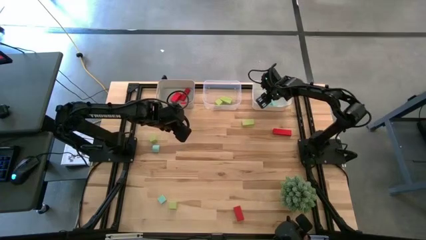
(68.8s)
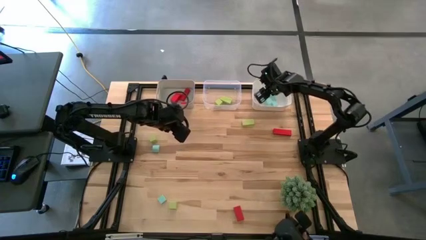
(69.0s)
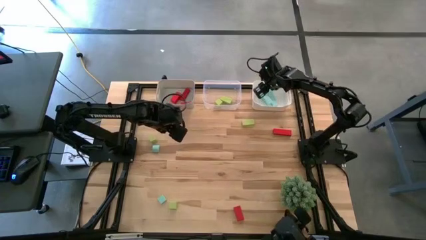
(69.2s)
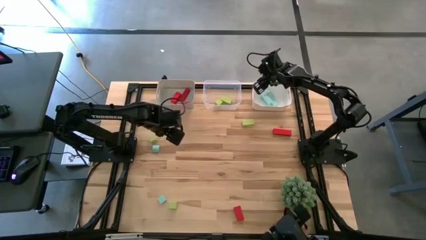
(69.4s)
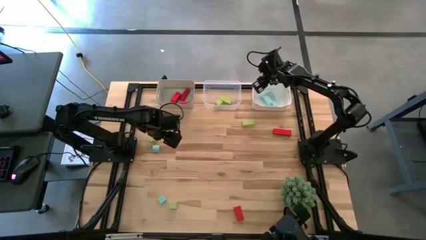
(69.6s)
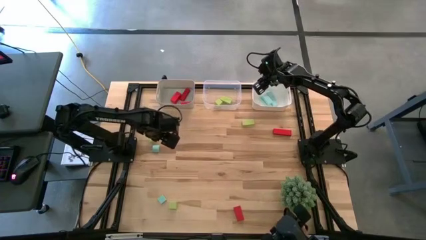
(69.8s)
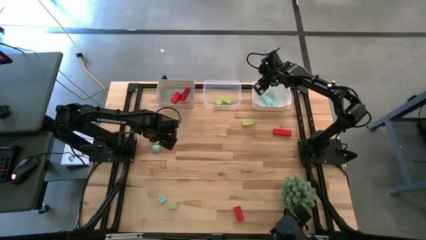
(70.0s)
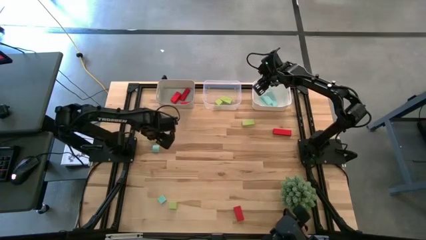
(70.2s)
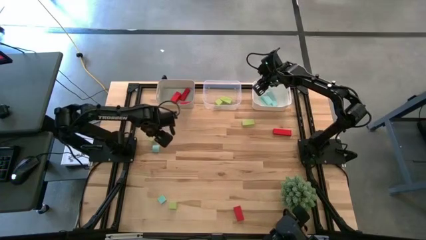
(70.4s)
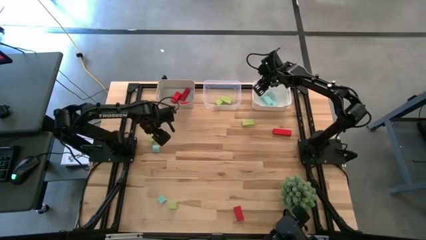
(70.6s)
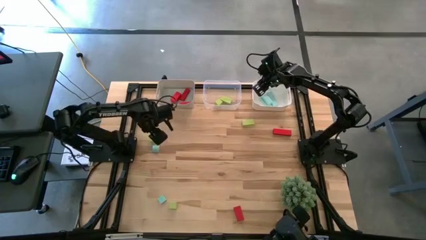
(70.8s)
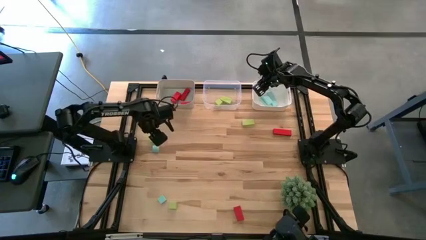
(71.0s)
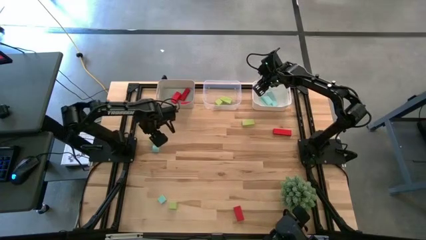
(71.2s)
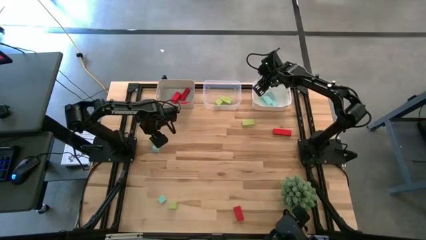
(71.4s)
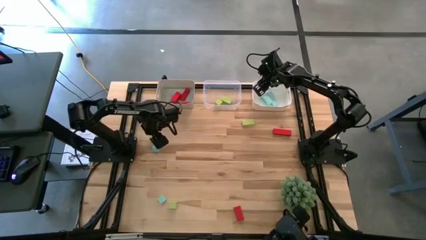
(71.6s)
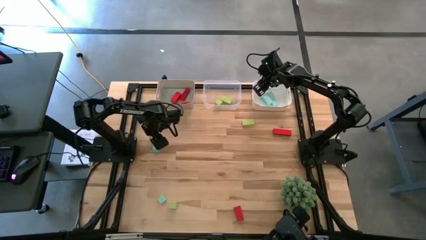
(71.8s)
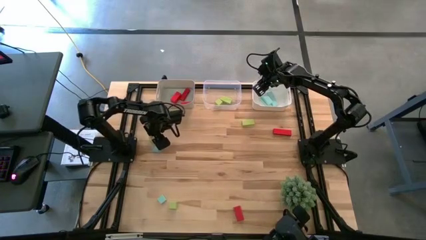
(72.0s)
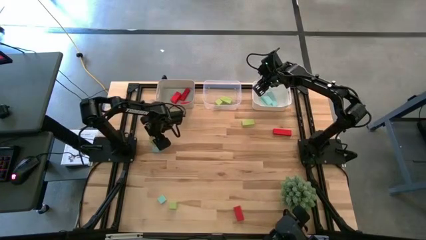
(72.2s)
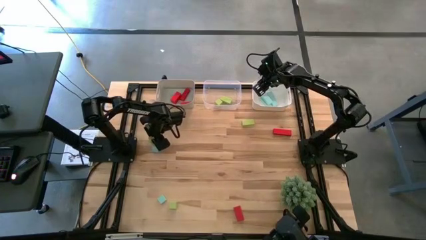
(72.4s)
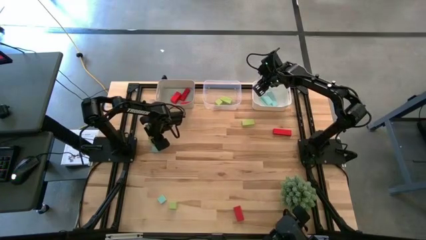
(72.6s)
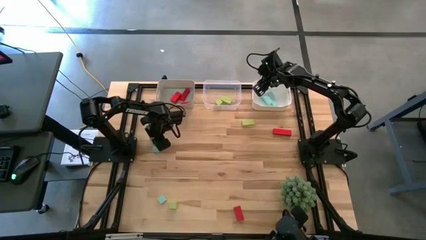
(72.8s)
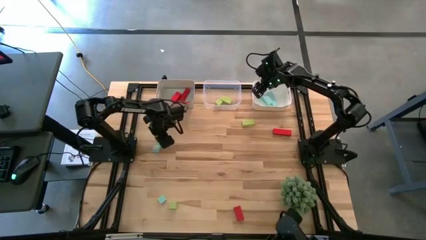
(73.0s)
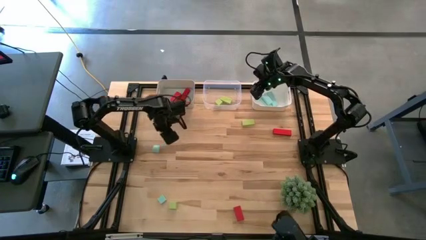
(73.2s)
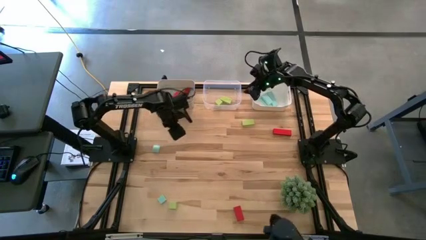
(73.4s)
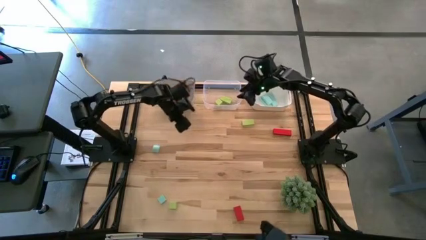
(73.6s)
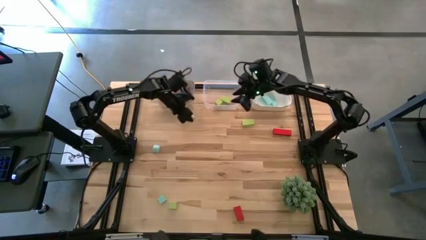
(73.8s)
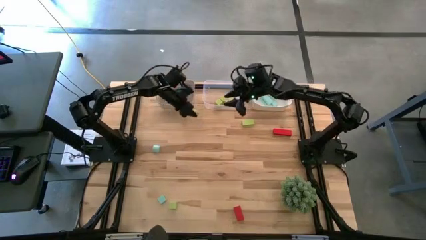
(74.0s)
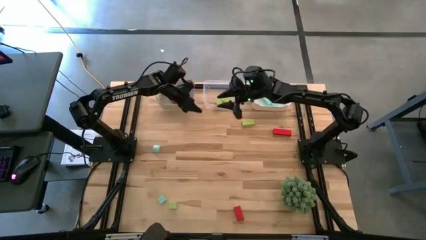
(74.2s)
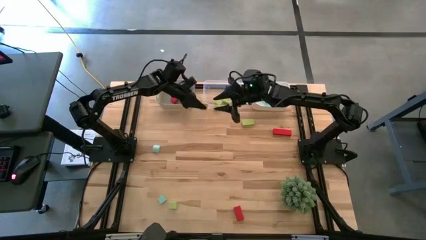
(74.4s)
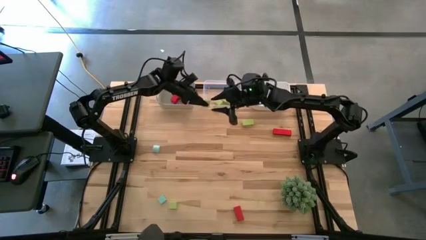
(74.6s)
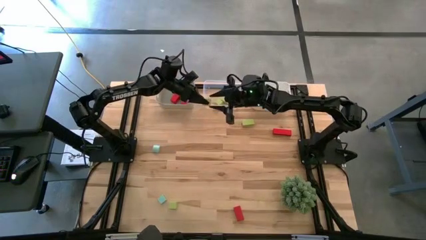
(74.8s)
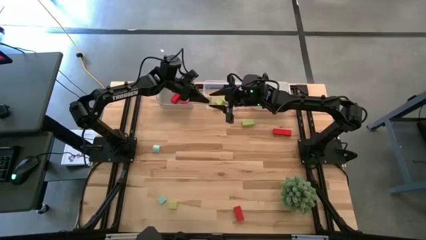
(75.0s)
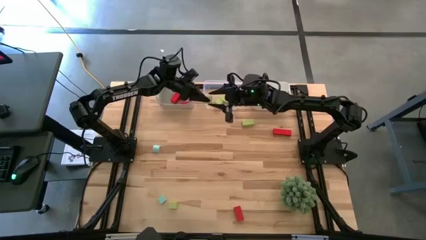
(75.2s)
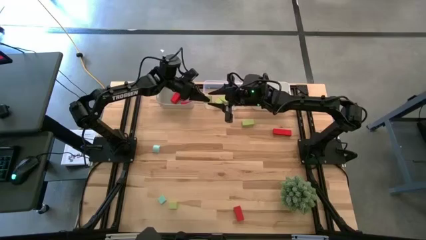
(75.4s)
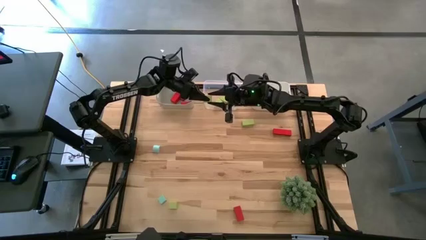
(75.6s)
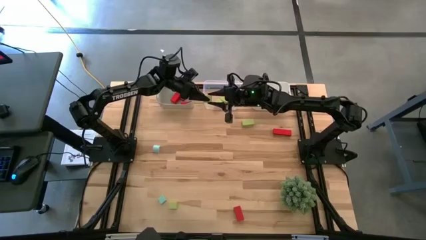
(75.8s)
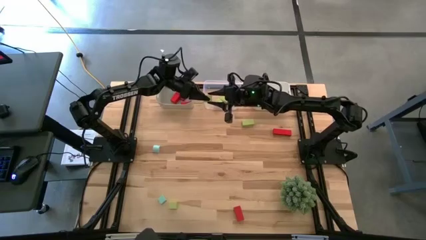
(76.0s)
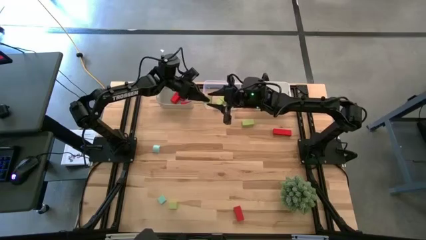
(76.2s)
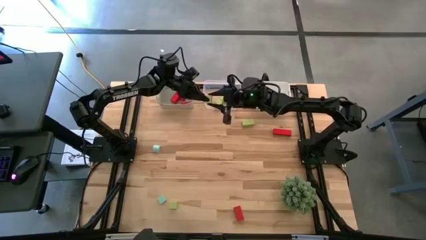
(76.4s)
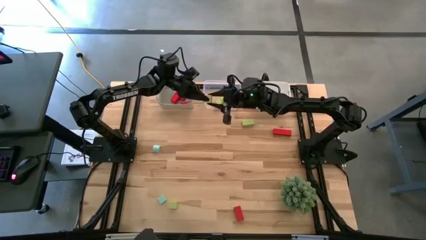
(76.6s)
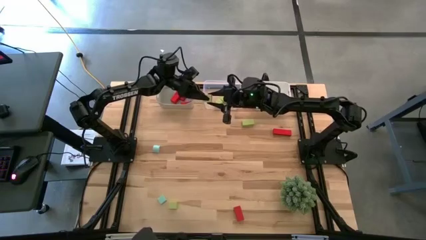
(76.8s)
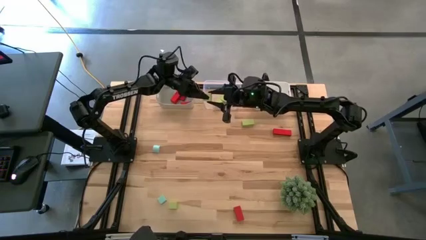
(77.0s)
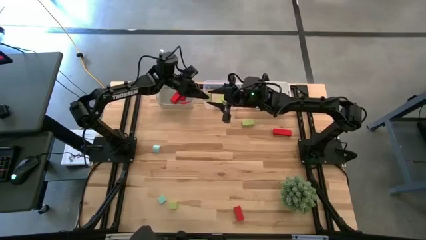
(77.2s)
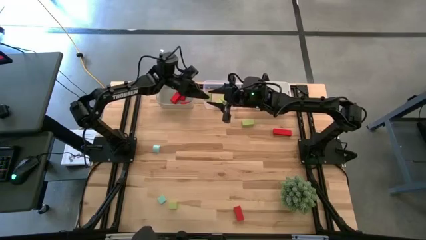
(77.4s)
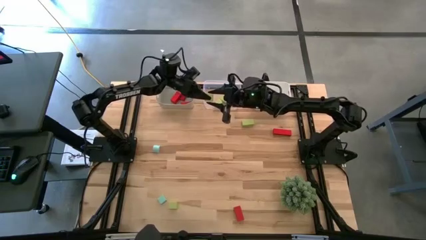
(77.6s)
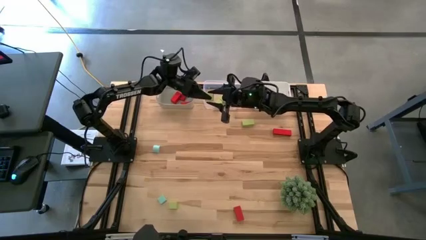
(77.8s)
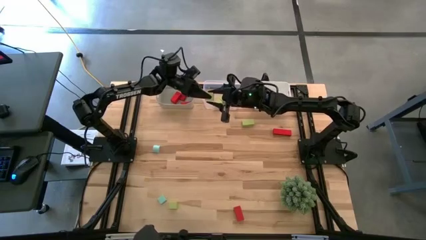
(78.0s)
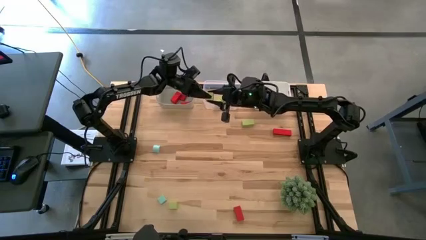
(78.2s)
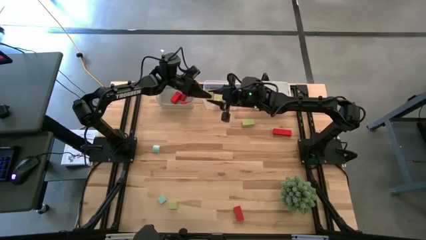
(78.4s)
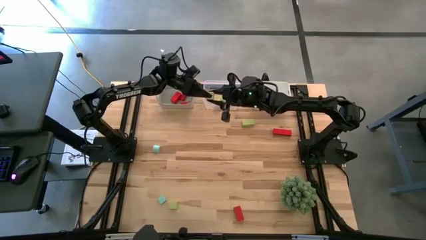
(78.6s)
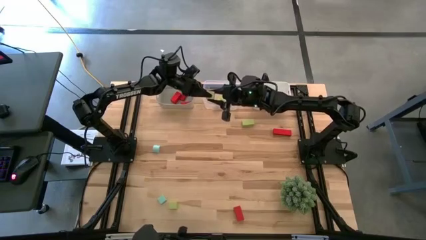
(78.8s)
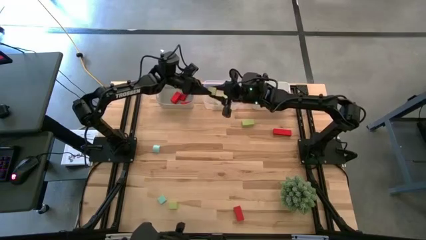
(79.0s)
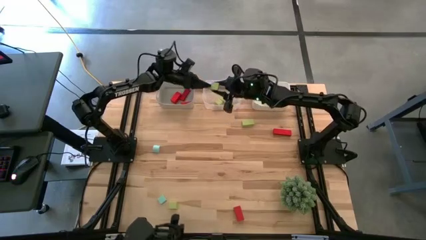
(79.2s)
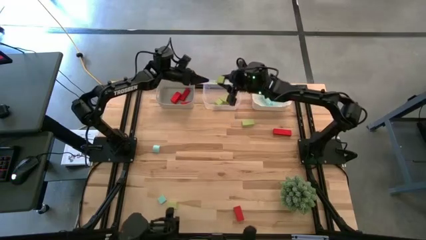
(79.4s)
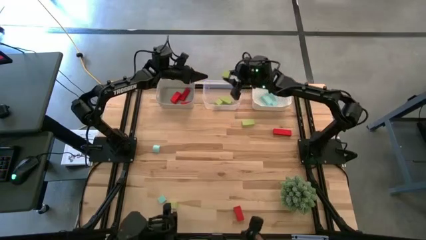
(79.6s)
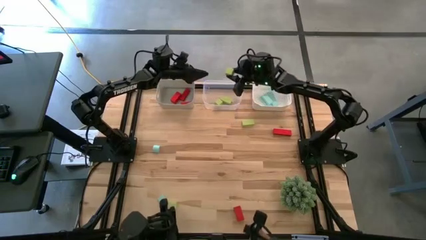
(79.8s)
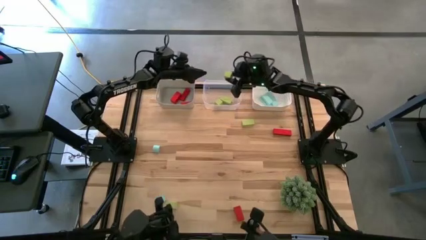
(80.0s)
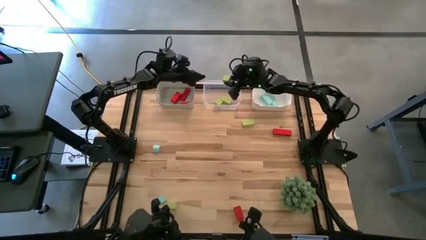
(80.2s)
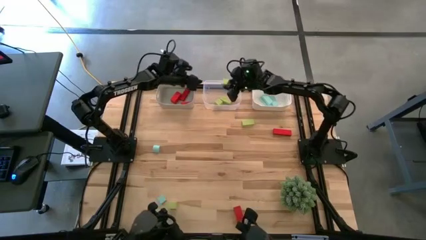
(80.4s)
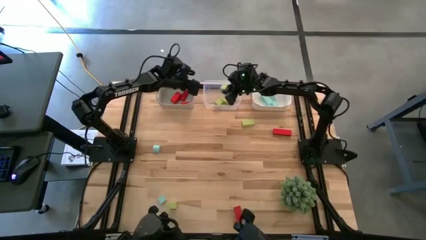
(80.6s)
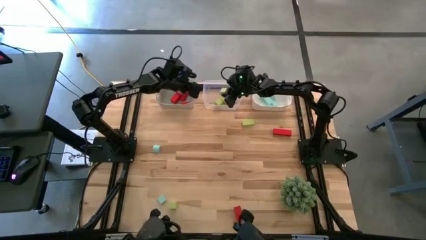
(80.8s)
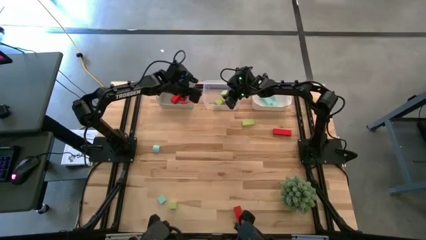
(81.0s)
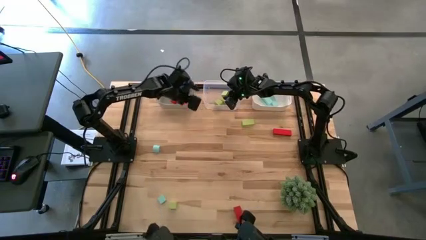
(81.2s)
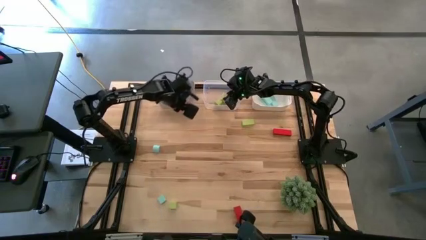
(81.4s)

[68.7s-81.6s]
Task: Sort & place blocks by color
Put the green block into the transparent bin

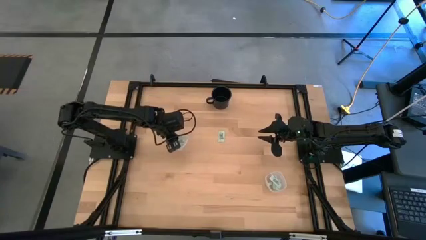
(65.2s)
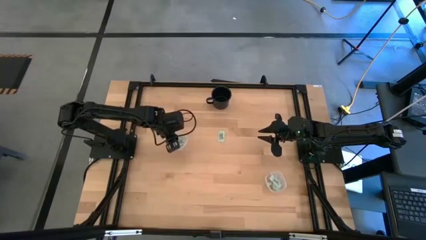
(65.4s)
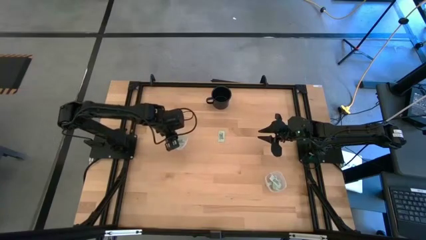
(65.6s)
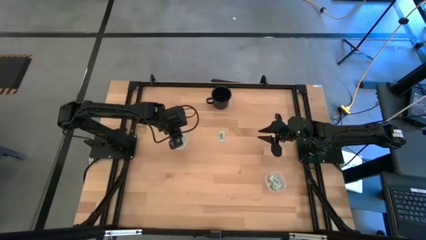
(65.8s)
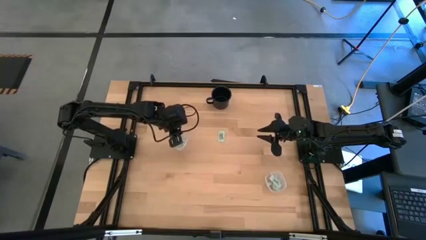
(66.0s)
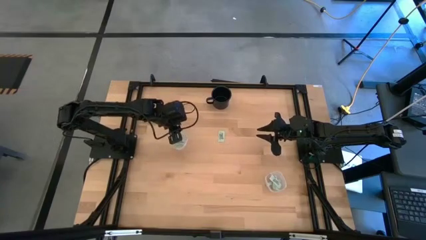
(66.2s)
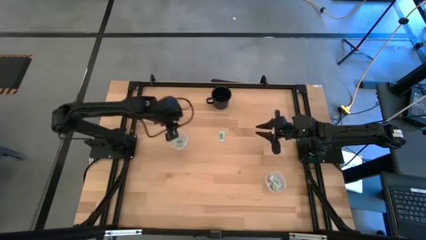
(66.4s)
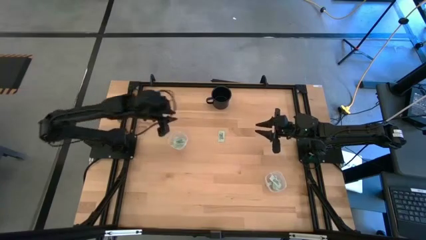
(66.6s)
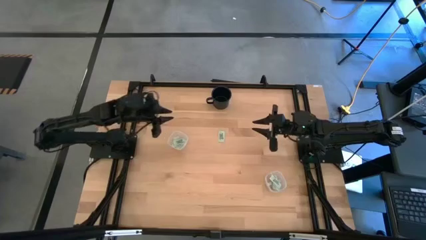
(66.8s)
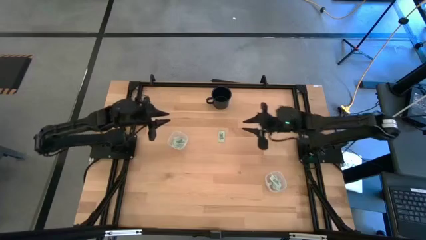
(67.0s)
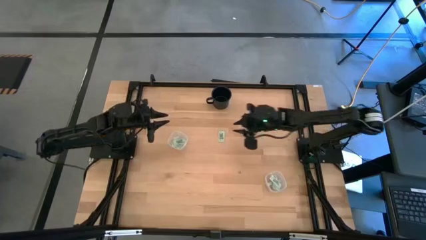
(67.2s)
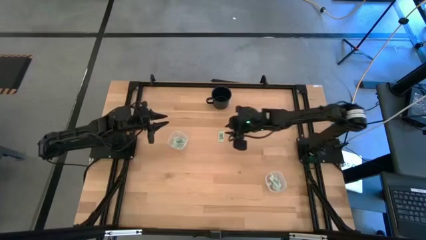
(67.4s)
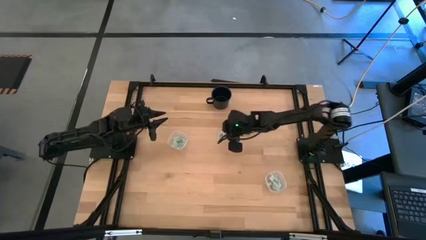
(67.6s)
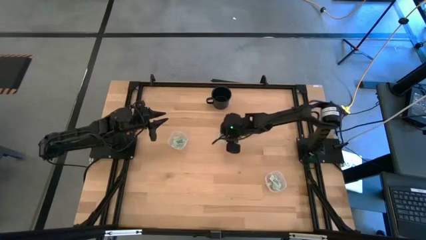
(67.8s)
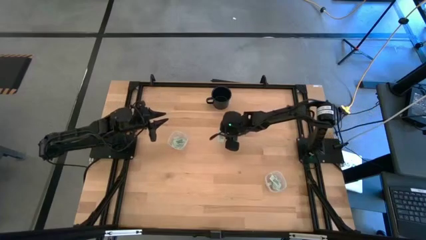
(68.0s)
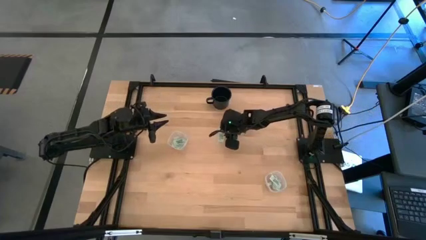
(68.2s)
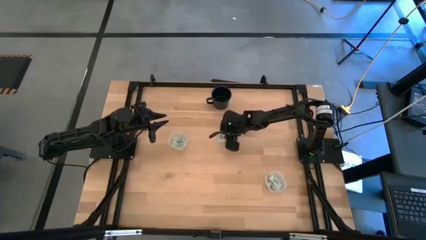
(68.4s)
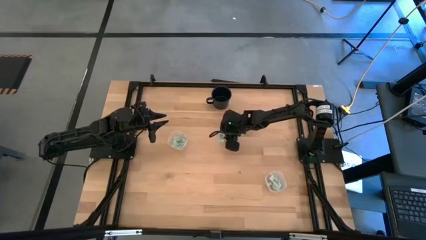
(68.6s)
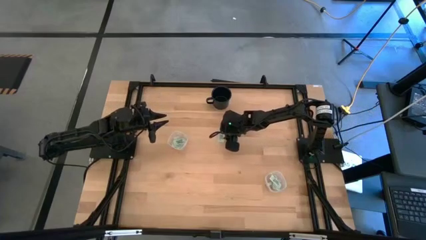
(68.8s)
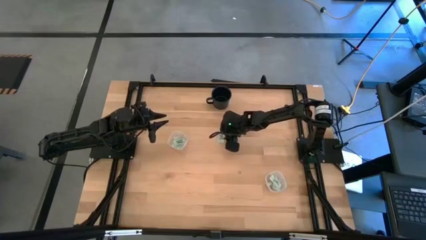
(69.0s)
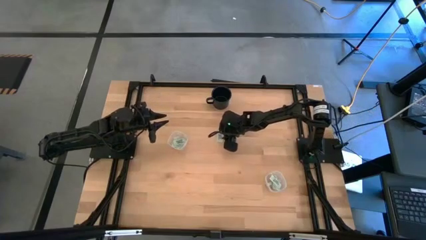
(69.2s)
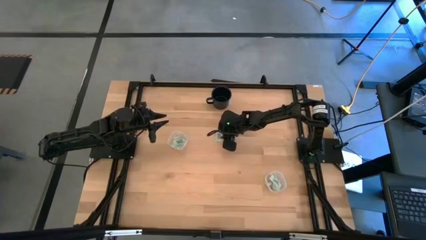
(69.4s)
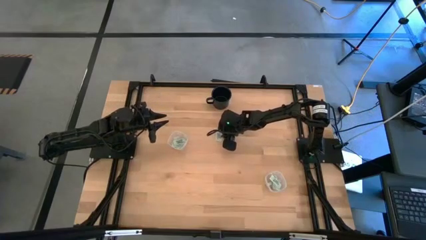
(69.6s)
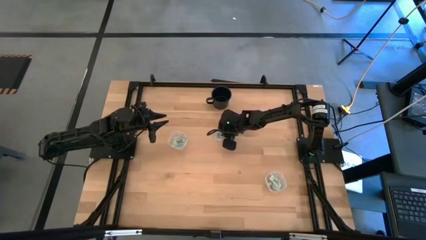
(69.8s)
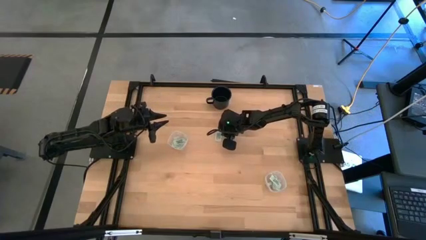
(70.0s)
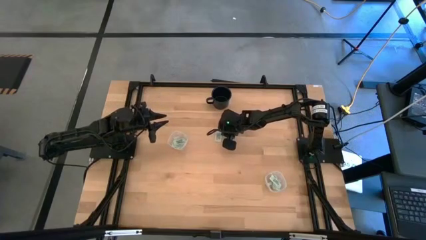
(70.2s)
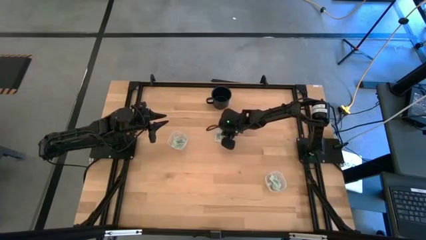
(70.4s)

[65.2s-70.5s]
Task: Pick and place items into bin
Put the white stevia packet into the bottom transparent bin
